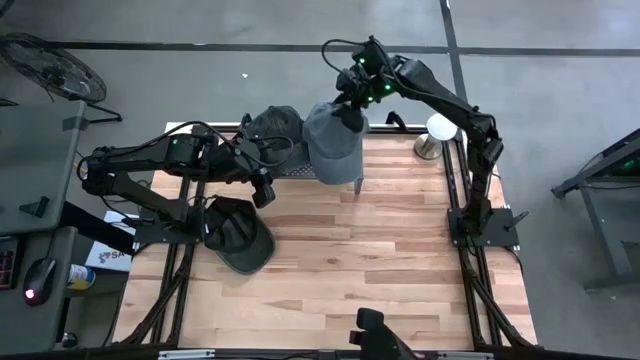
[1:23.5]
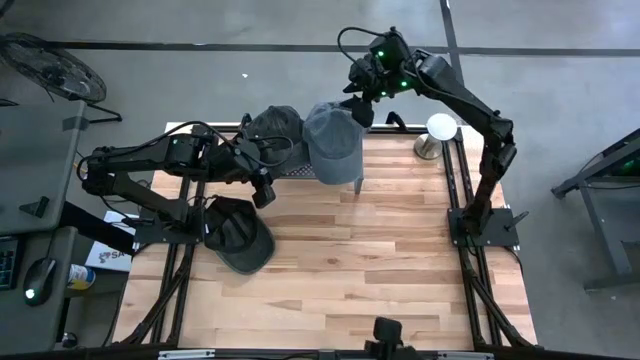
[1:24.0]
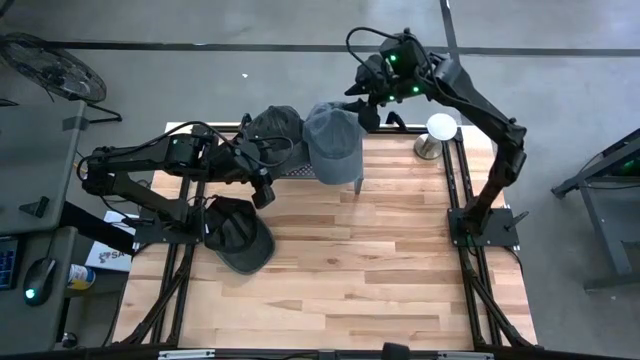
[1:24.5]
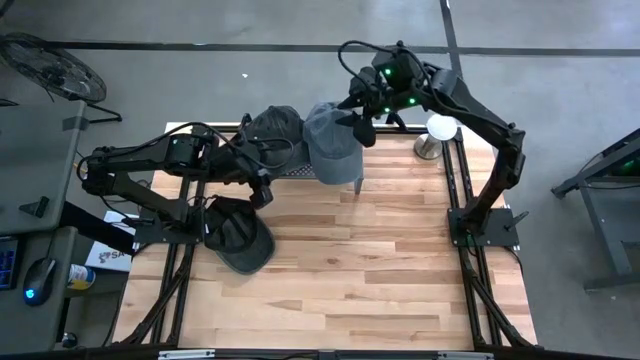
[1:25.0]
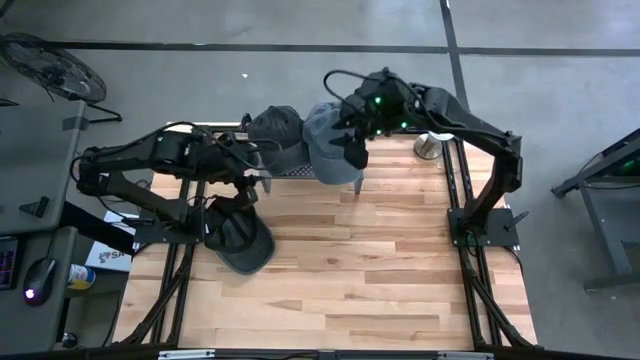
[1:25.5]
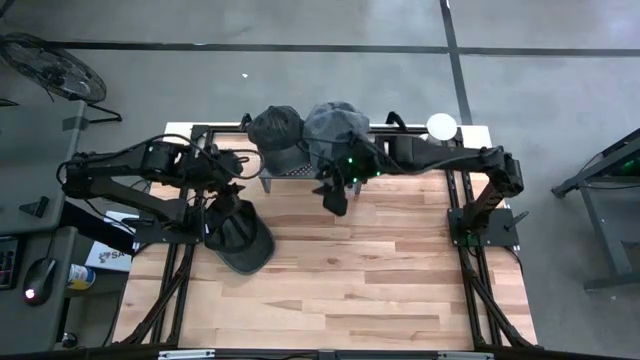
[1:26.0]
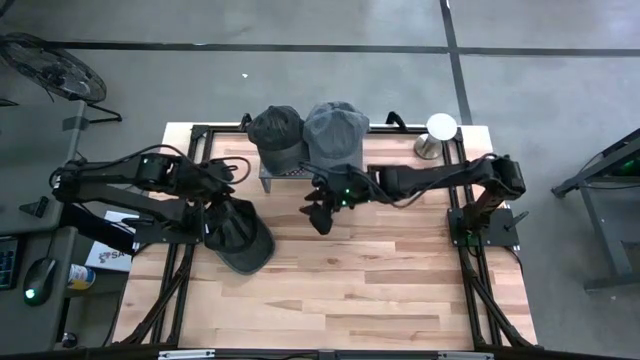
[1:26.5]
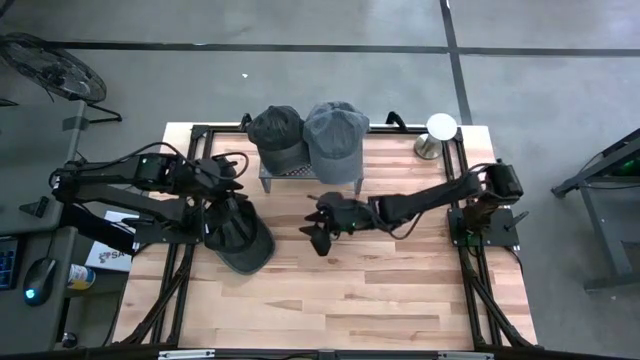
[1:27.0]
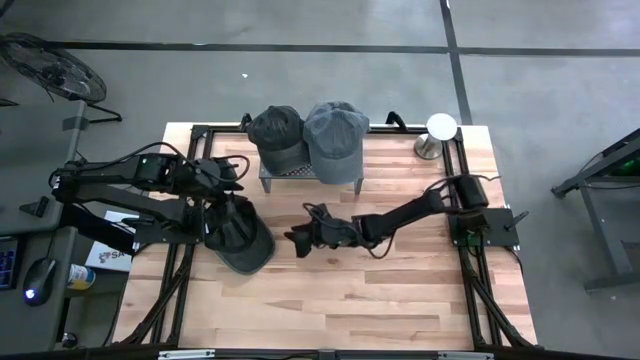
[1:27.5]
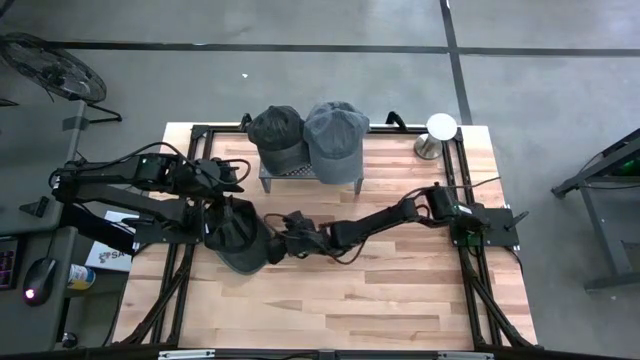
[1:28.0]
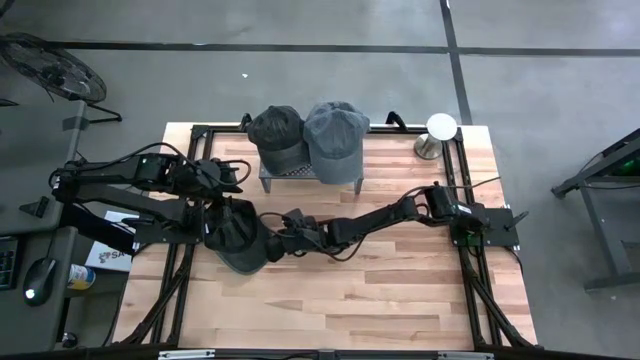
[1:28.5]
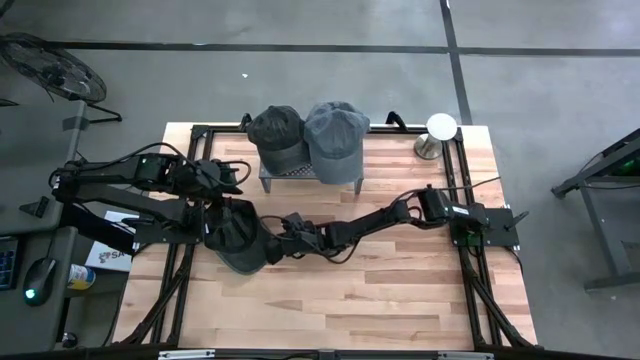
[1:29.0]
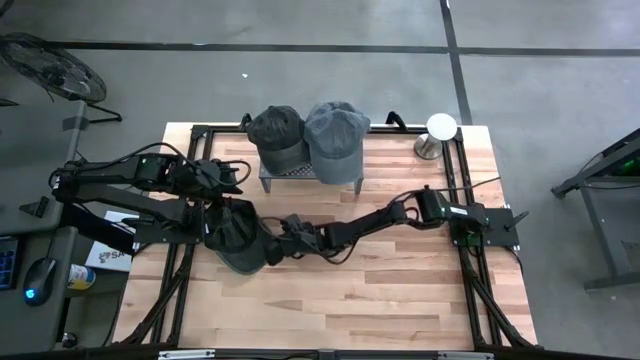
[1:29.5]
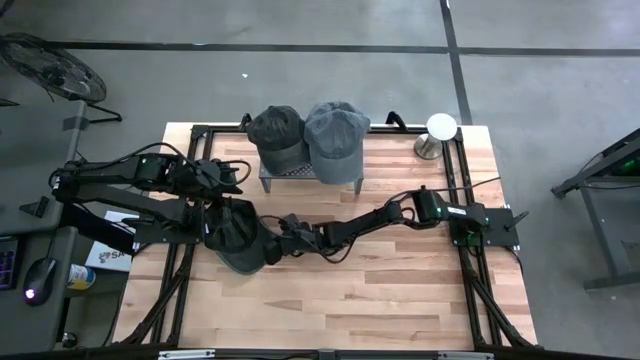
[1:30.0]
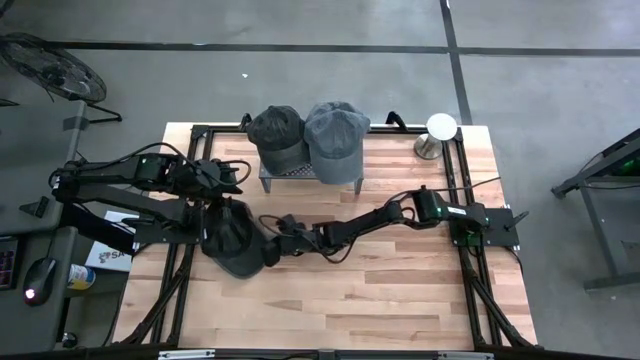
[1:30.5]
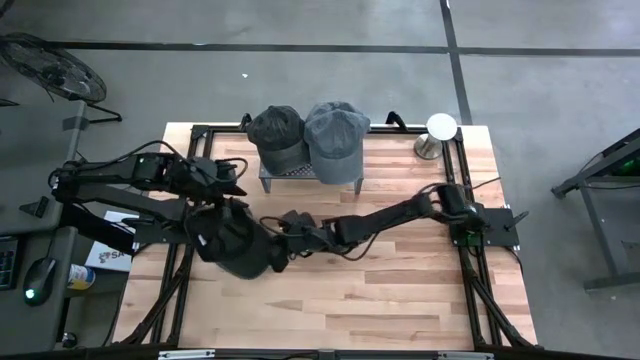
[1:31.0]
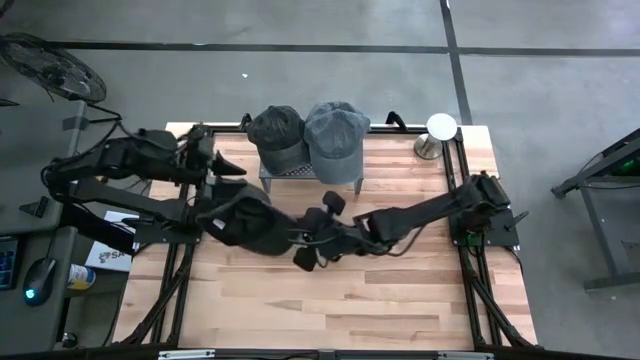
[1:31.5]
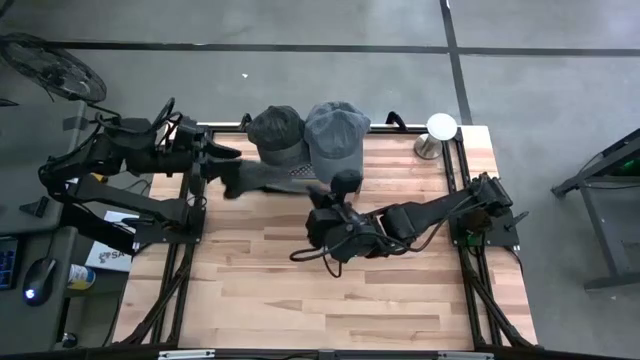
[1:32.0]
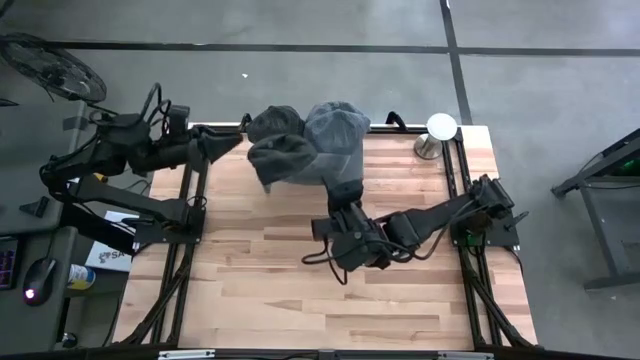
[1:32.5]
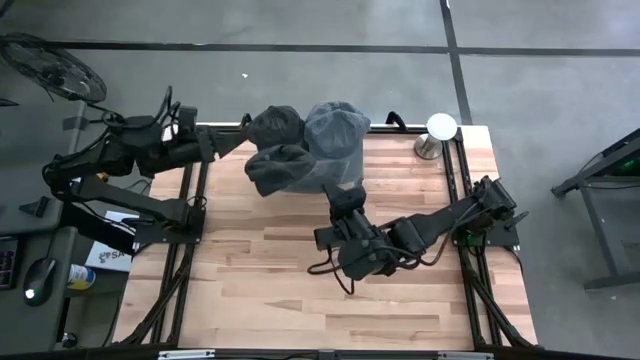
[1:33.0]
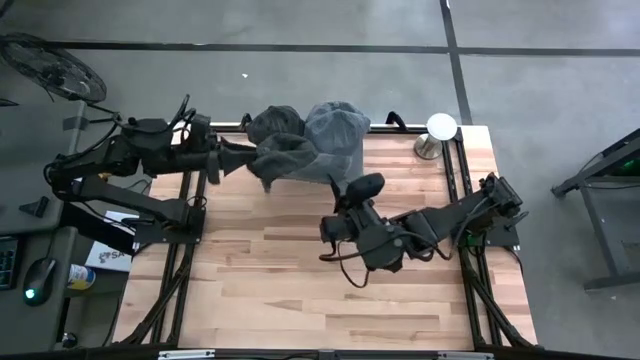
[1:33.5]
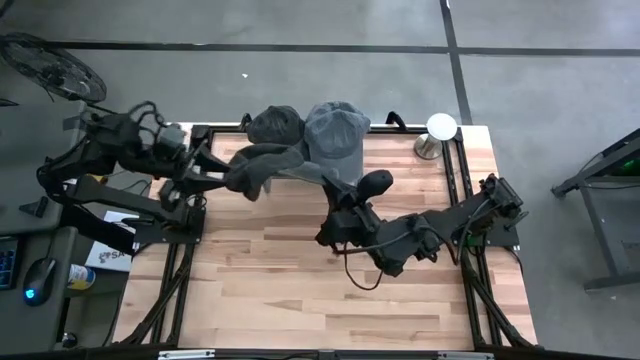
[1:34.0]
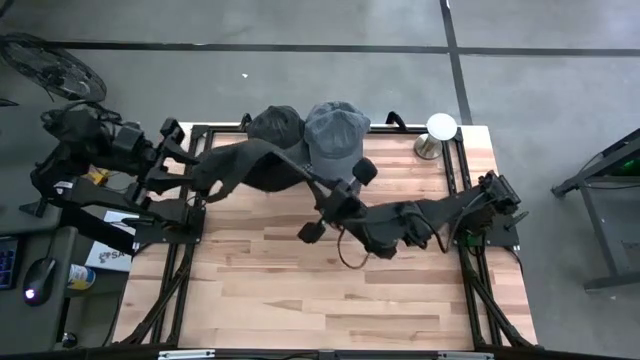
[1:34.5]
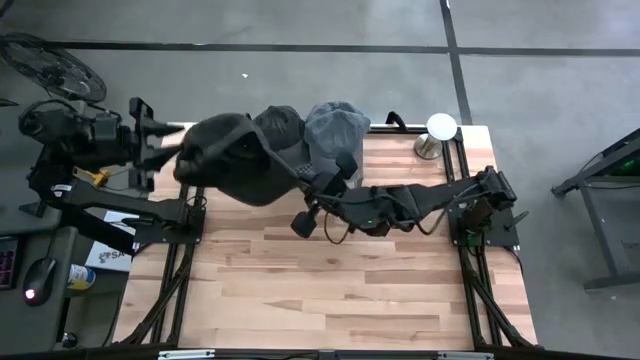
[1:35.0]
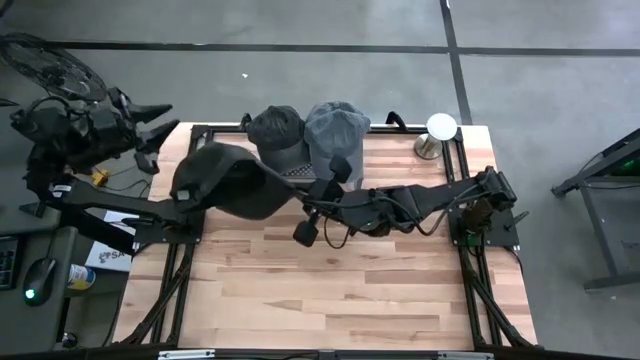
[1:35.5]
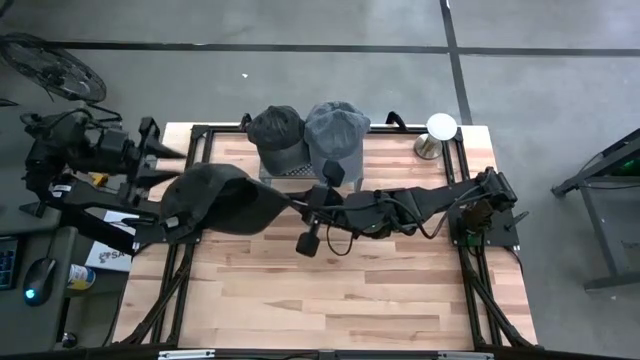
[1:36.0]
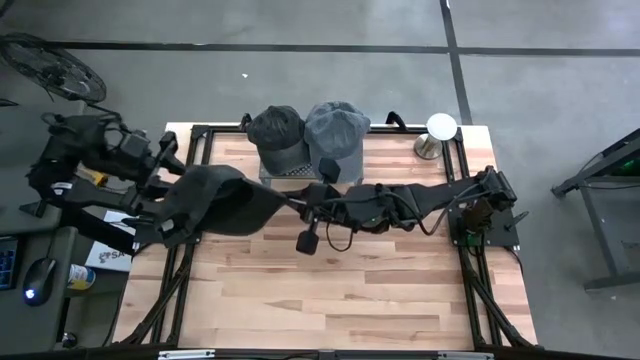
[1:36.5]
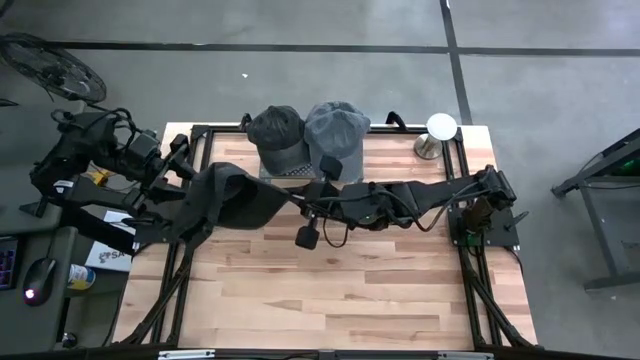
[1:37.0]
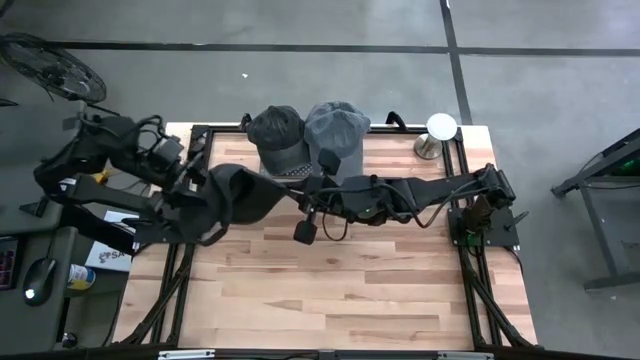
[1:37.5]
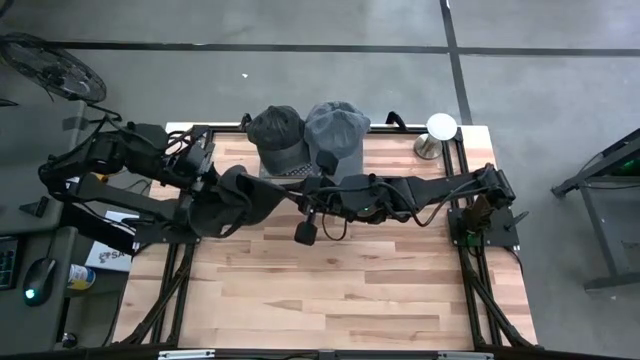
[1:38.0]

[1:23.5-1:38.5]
Task: Pick & Place hat
Stack the black cap on top of the black cap on the shelf

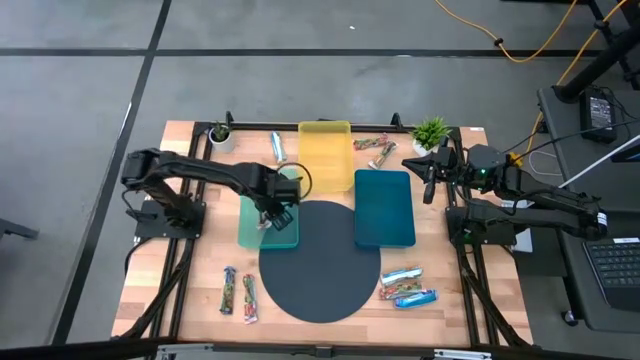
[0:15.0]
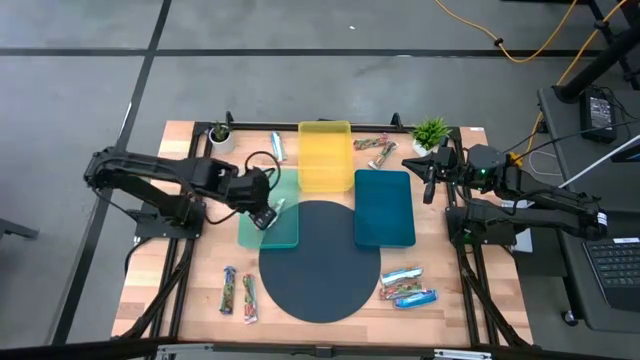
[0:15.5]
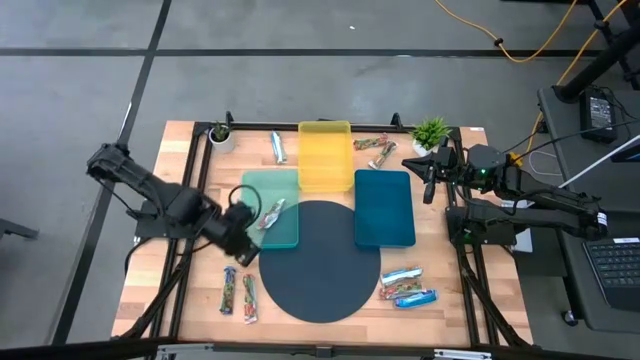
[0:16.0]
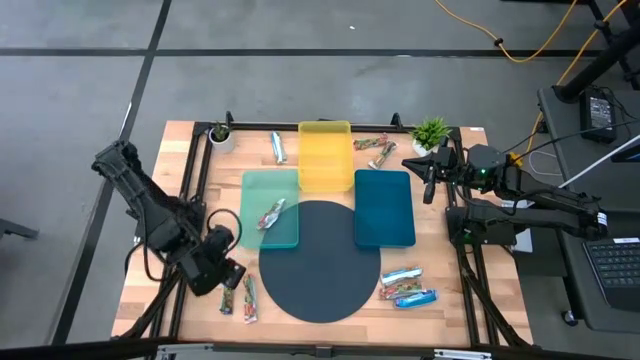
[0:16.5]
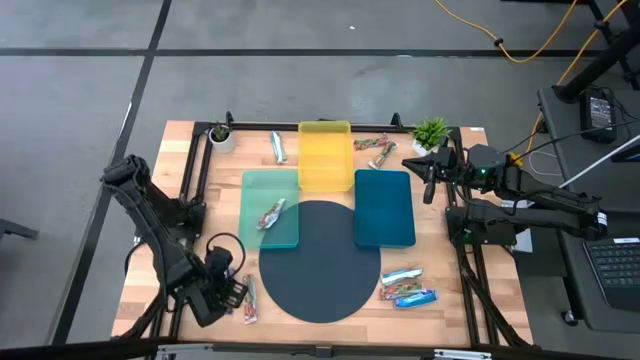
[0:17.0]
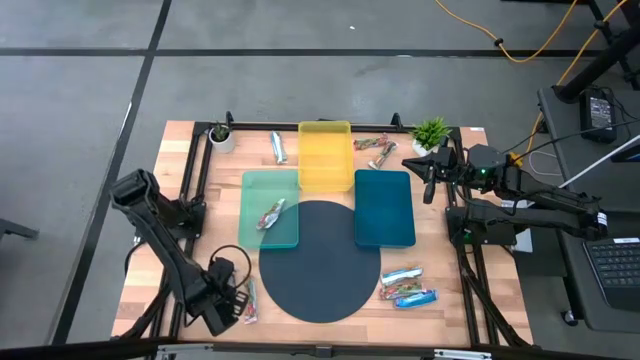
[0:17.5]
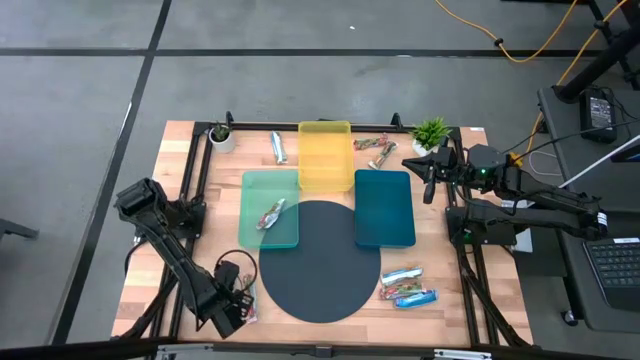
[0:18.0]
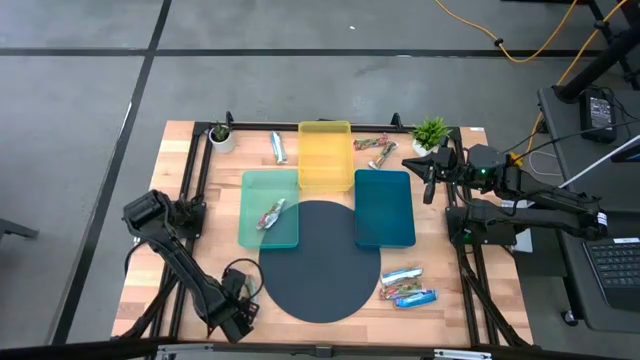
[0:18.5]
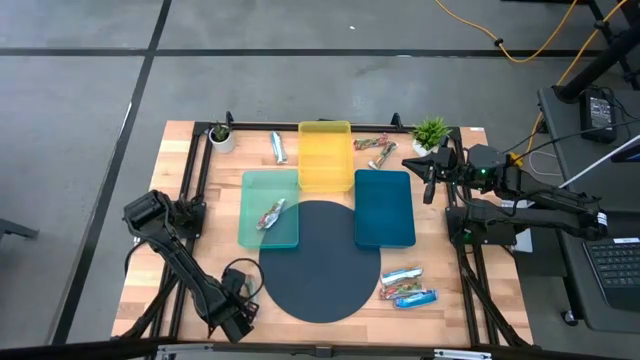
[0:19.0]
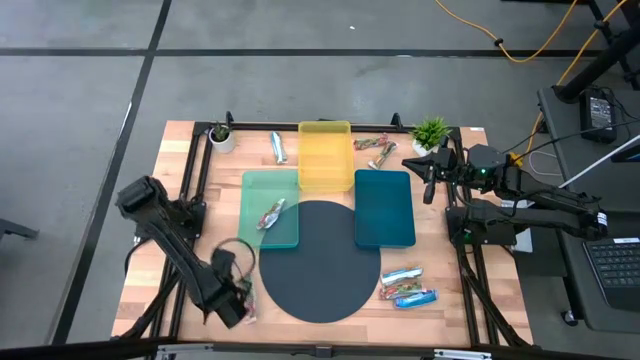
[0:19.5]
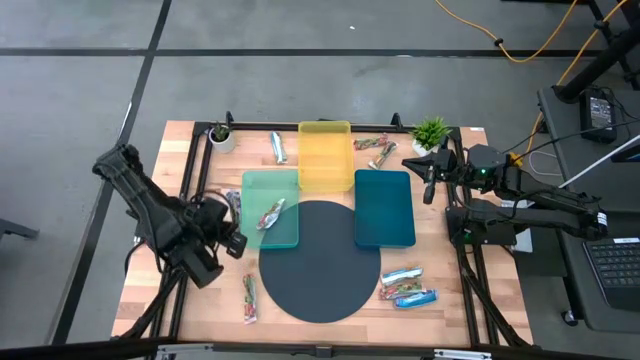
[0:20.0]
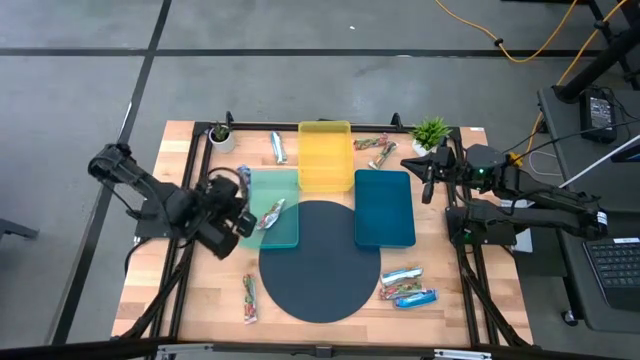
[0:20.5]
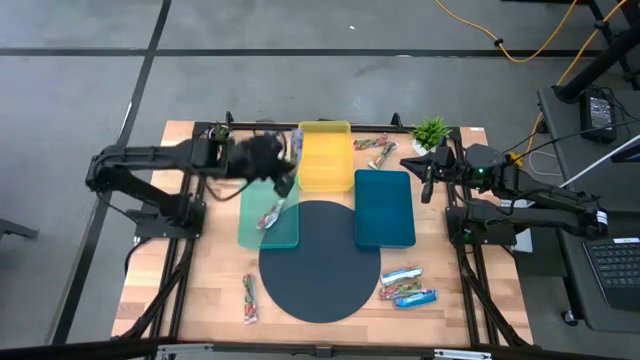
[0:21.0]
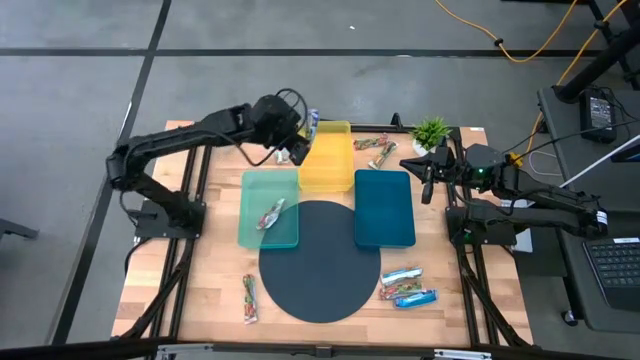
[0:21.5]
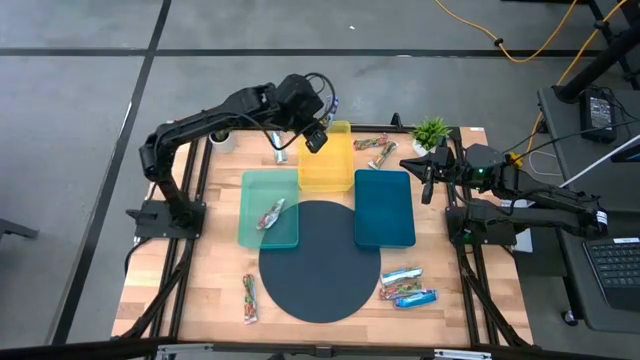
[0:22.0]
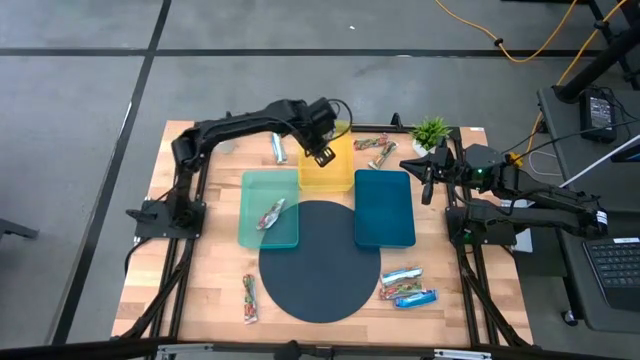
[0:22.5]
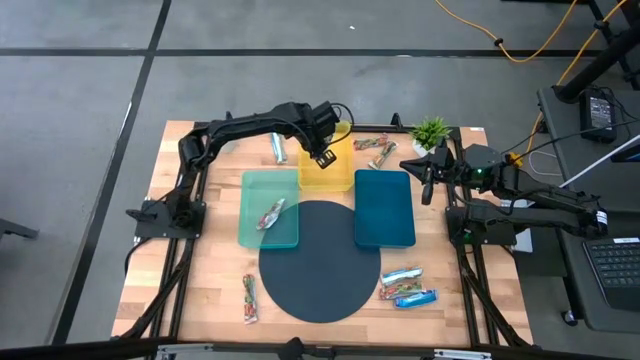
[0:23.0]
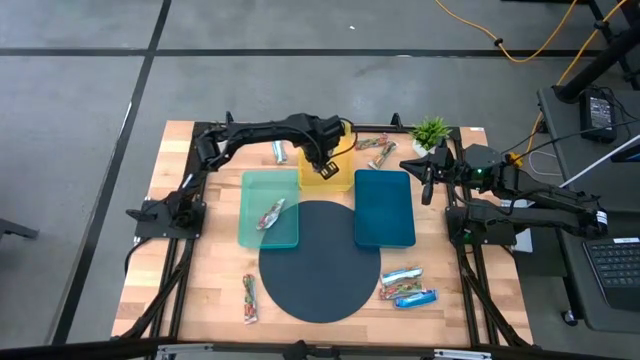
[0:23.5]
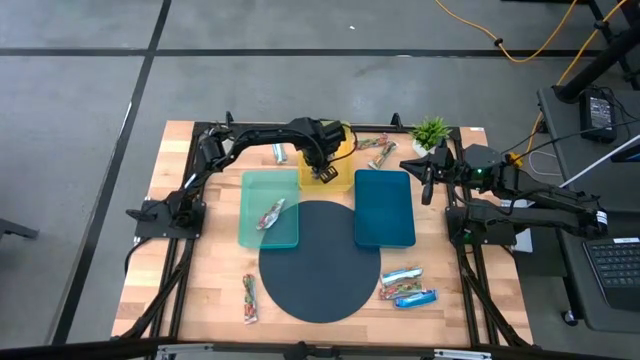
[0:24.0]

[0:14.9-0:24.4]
Task: Pick and place Granola Bars by type
Put the blue granola bar into the yellow bin
